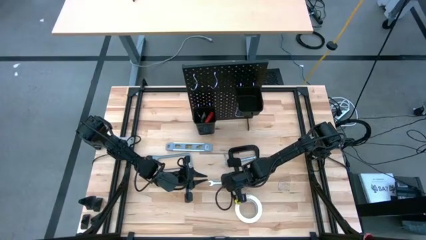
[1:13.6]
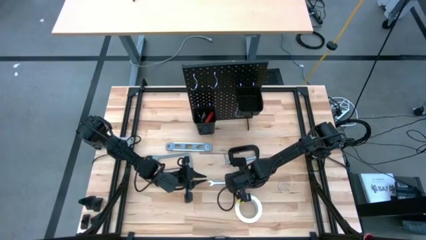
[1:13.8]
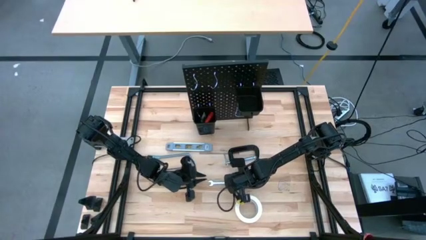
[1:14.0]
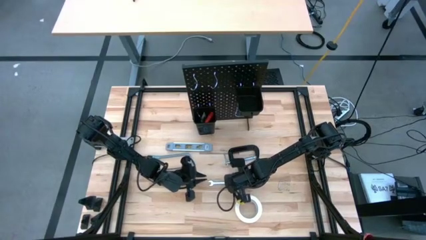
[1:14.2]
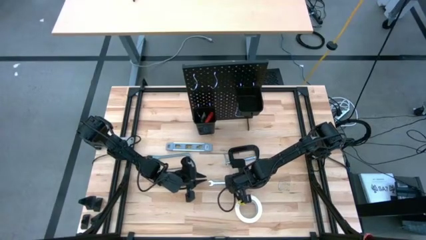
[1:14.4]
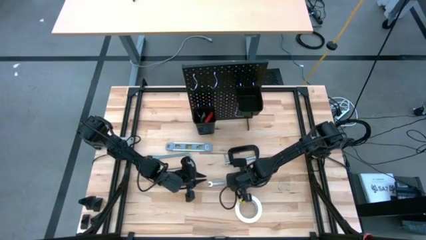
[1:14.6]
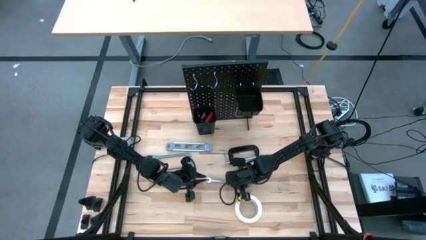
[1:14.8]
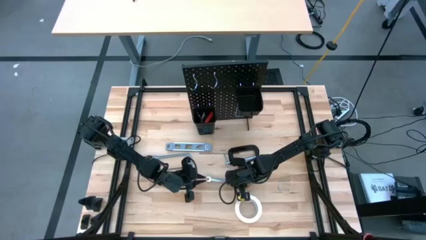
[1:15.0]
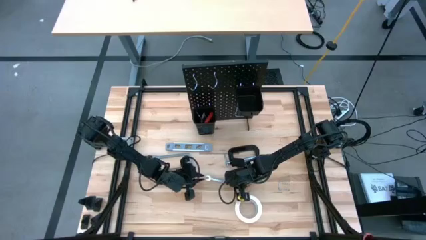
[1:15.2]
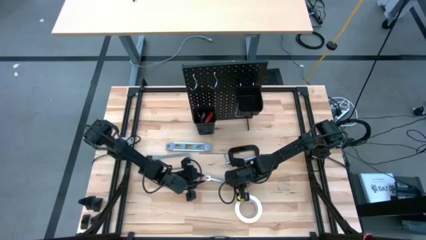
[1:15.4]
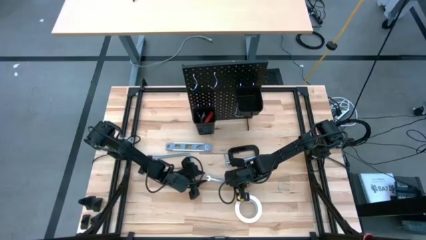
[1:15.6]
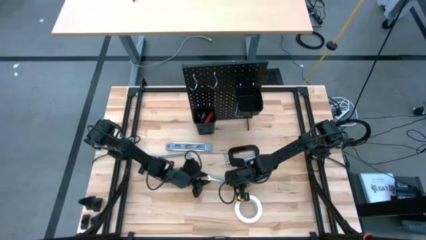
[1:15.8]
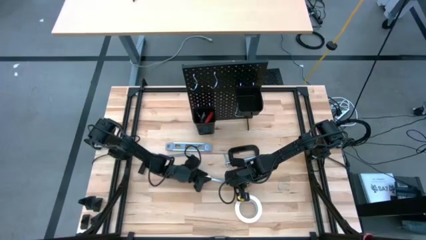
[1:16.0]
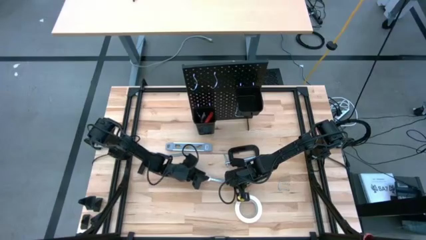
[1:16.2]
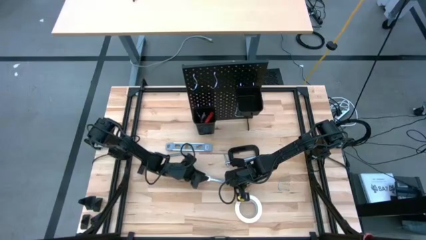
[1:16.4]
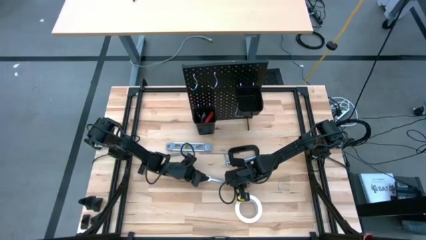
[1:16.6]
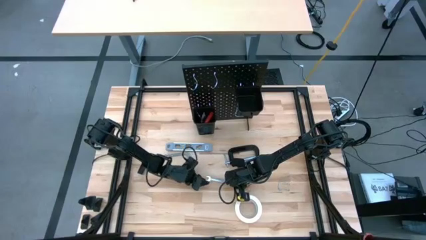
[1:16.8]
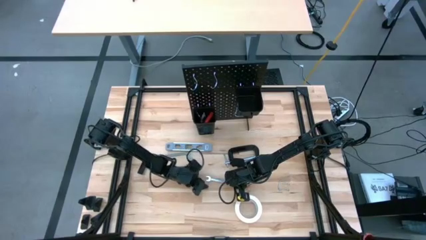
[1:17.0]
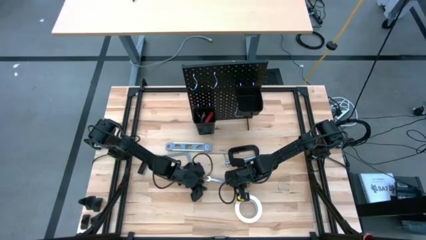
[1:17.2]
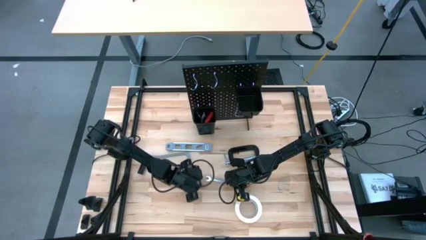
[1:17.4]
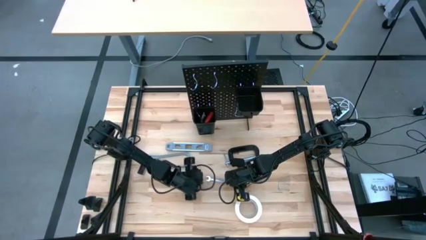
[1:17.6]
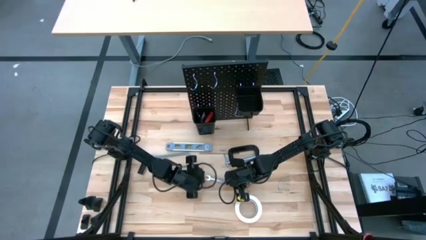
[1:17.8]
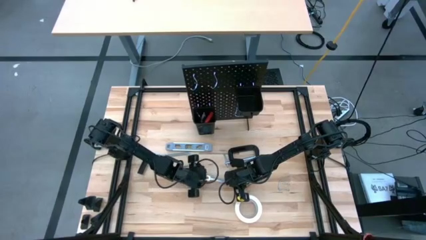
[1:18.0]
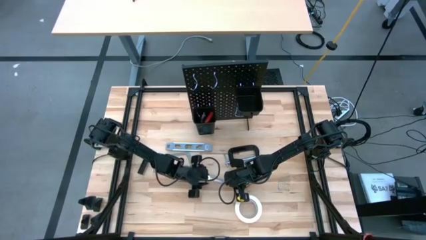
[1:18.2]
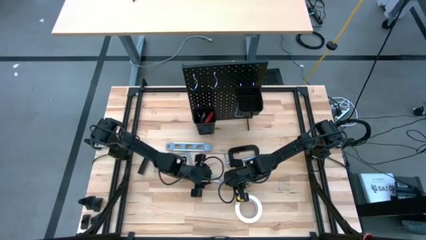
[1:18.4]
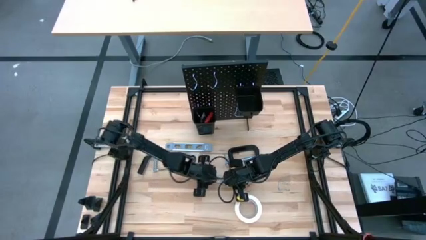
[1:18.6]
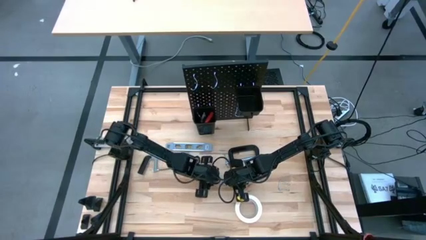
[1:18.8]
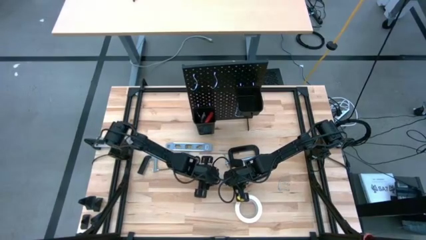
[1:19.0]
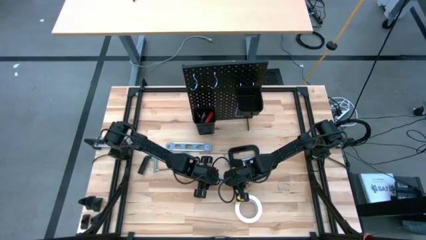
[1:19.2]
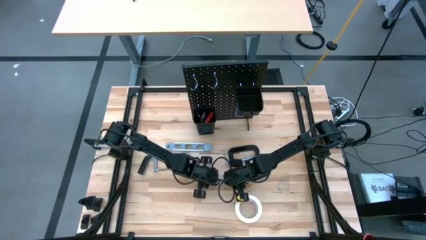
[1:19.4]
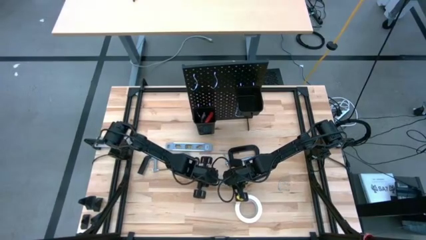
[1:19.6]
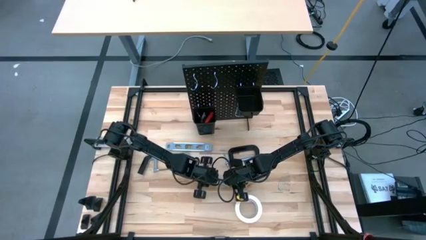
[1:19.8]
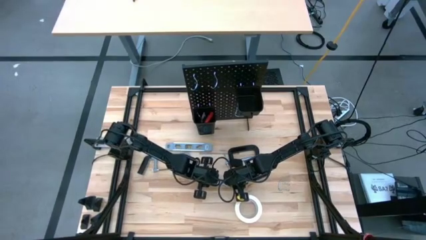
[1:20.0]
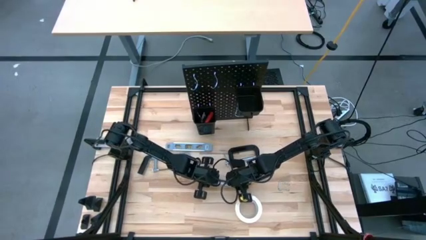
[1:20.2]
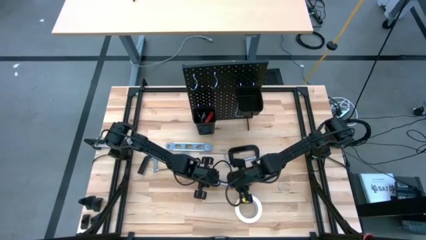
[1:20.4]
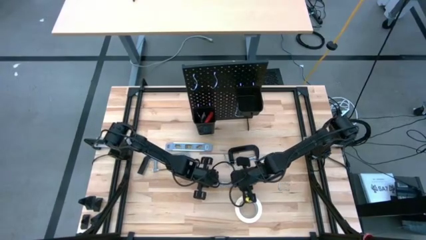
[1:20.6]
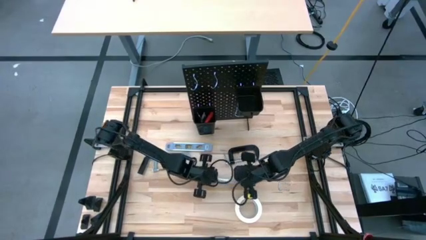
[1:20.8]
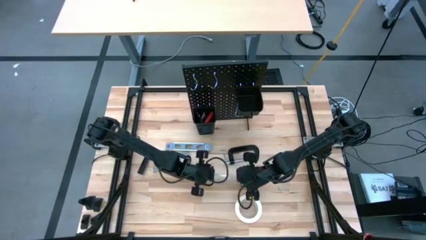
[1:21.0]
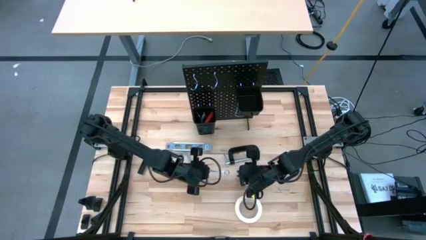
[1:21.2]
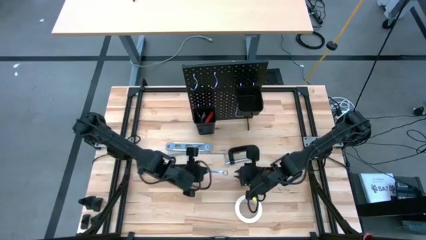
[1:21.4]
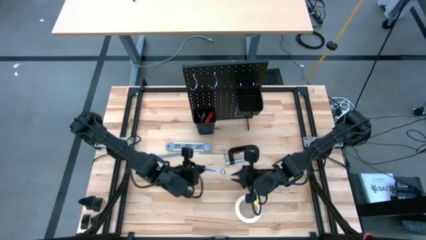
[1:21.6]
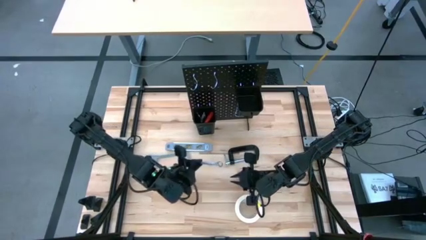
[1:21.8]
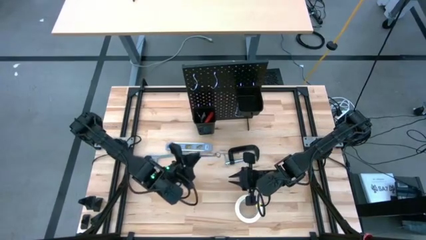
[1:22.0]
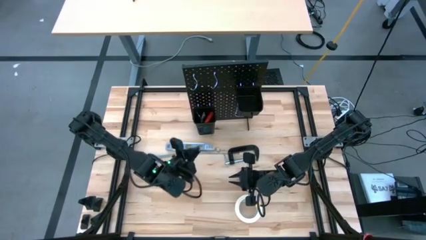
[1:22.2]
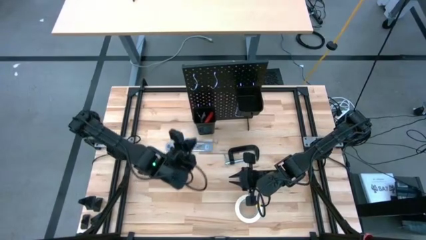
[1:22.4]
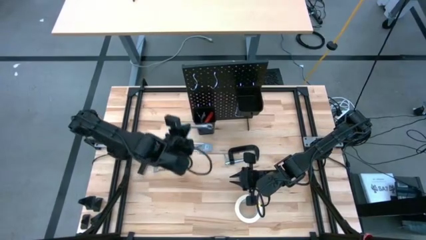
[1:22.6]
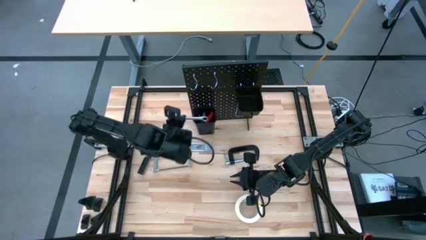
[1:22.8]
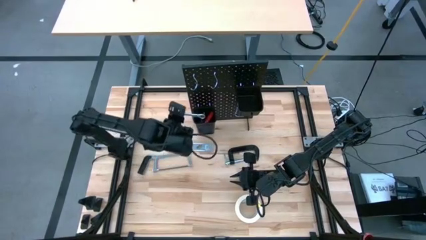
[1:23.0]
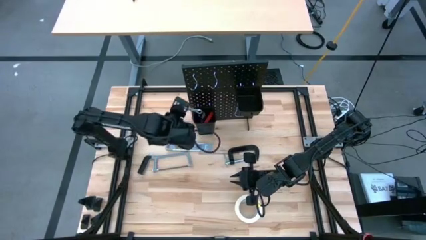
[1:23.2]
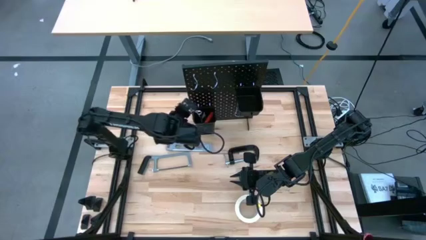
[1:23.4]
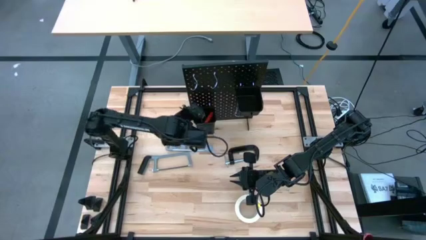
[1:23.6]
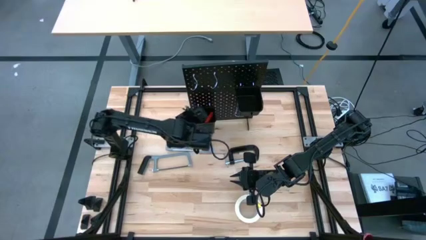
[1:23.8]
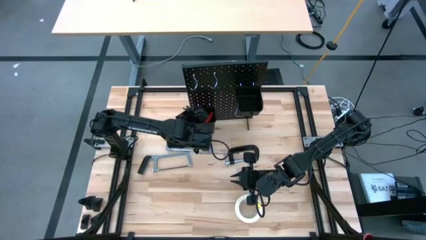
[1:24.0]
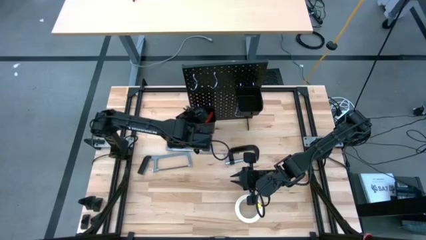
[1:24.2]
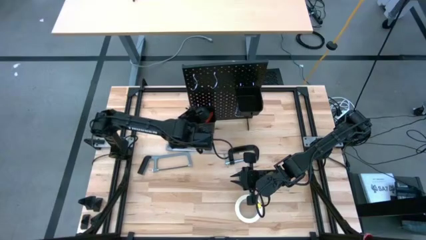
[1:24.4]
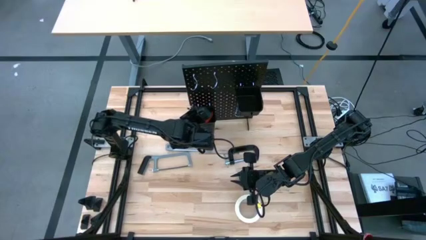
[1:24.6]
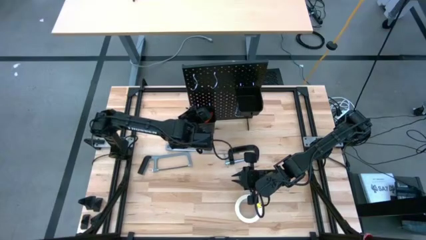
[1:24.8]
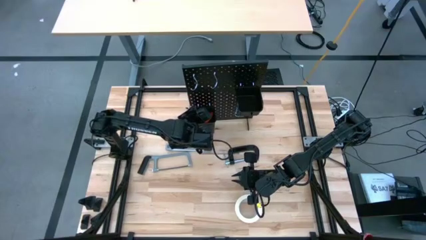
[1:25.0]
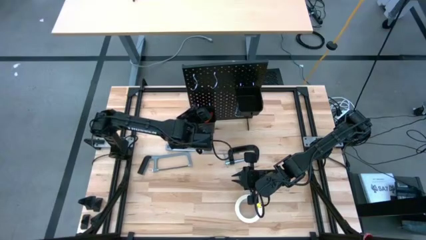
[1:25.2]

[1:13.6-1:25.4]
Task: Hang tools onto peg board
Put the wrench into the bottom black bin on the pegboard
